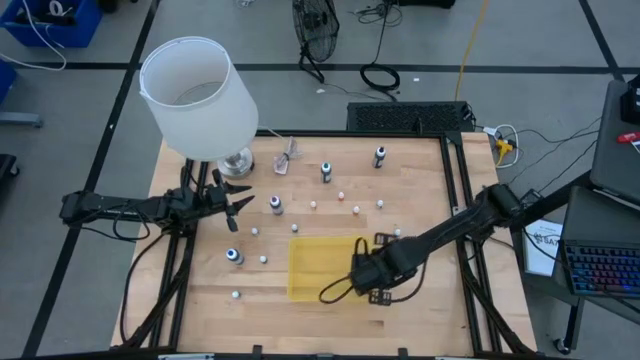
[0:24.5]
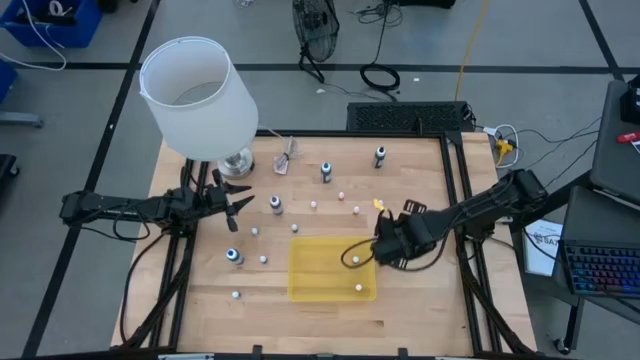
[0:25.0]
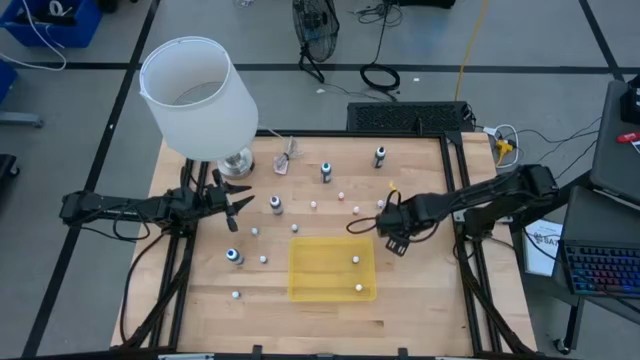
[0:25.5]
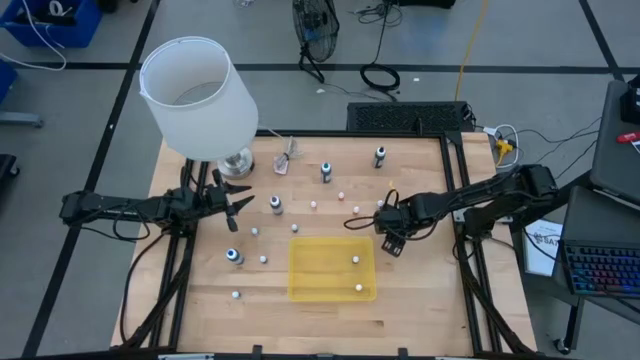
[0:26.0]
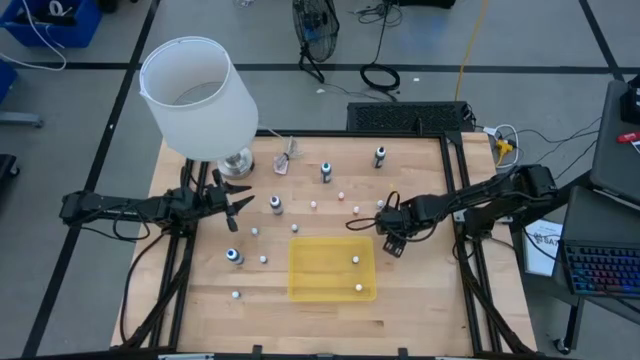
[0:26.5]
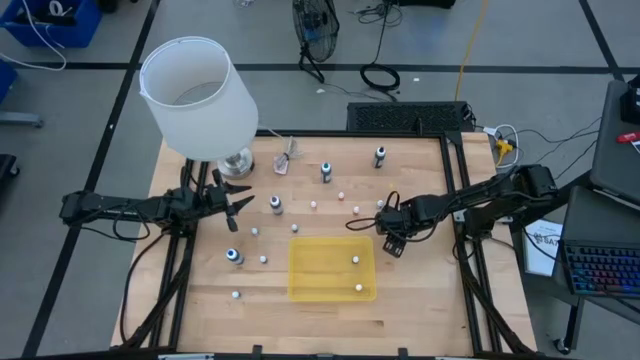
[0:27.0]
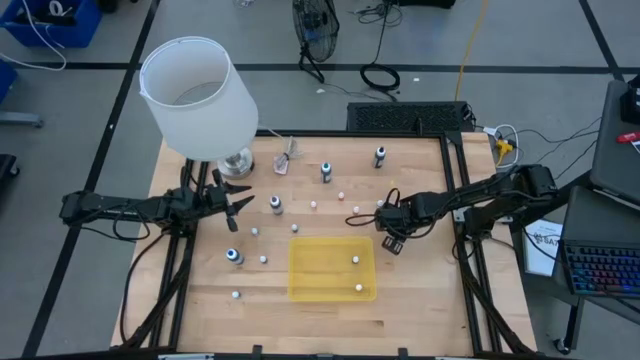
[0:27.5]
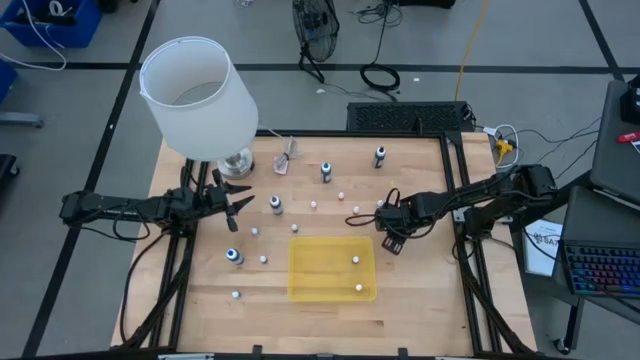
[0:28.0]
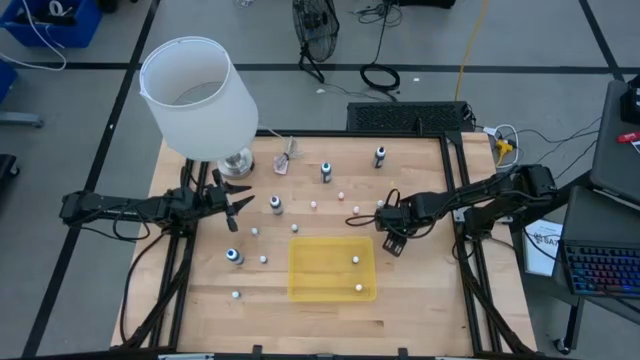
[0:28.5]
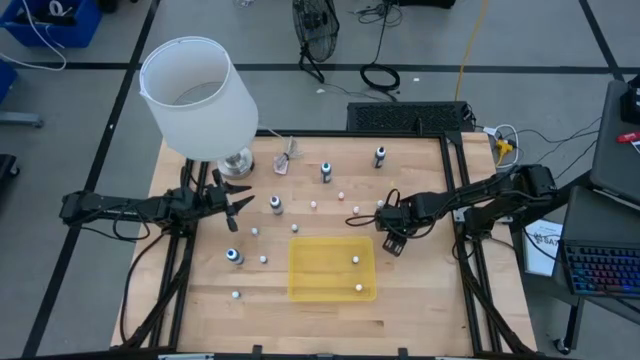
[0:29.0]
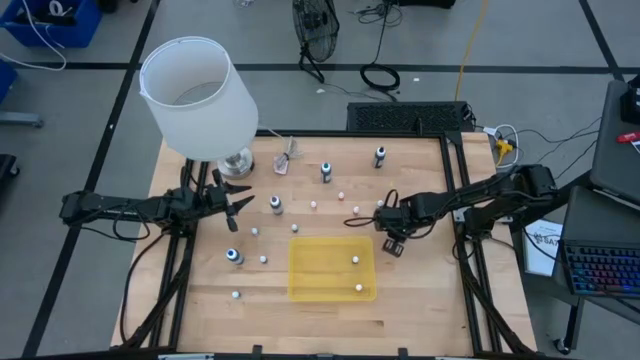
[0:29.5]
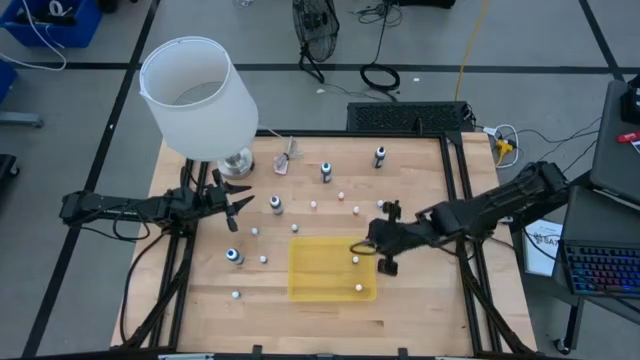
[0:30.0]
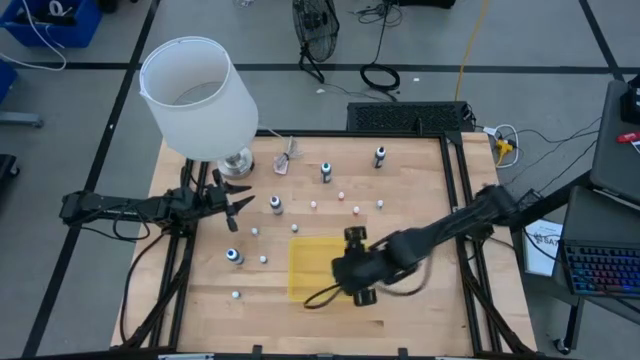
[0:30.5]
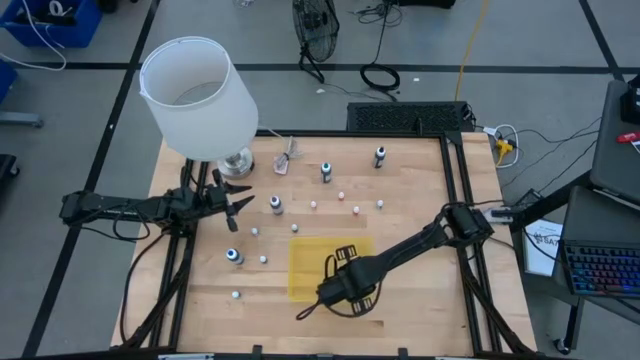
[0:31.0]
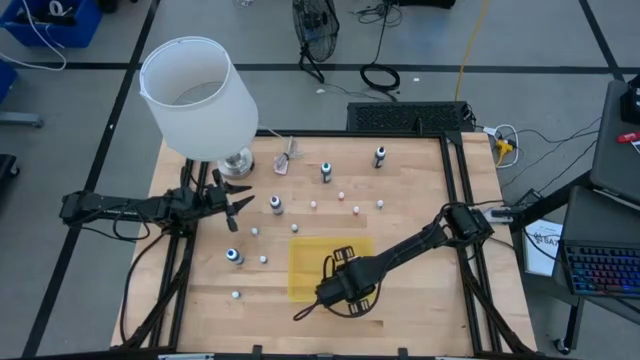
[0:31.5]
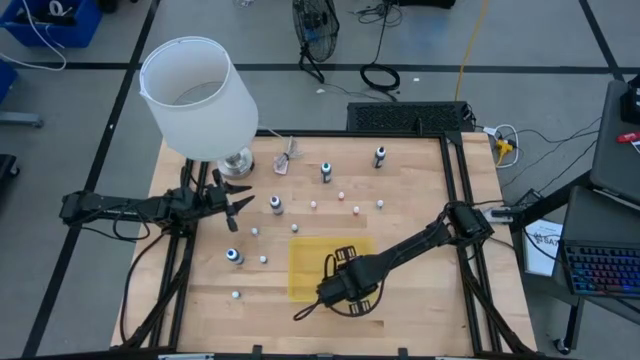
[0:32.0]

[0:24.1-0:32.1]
Task: Pick & Place food coloring
Put the small green food coloring bottle into the yellow container

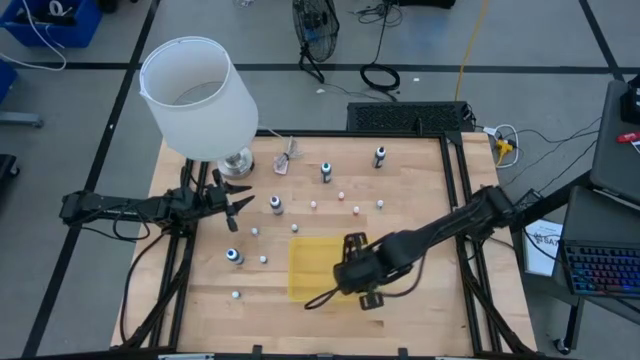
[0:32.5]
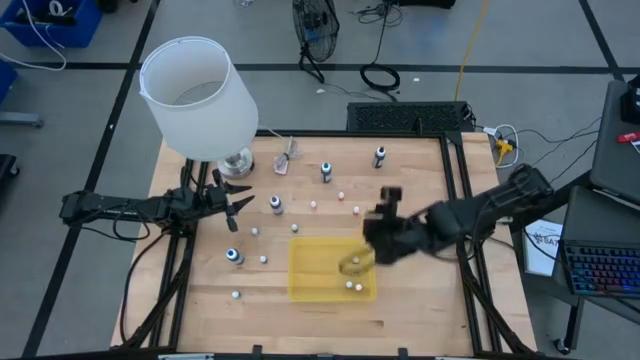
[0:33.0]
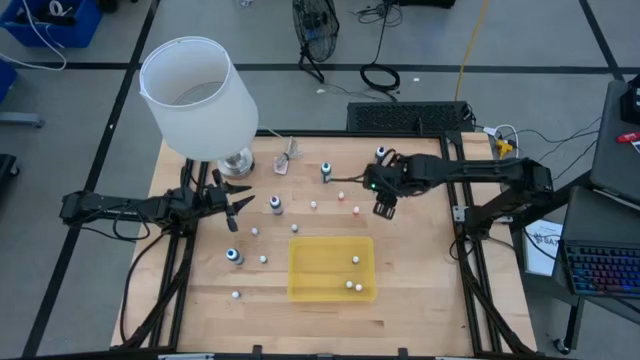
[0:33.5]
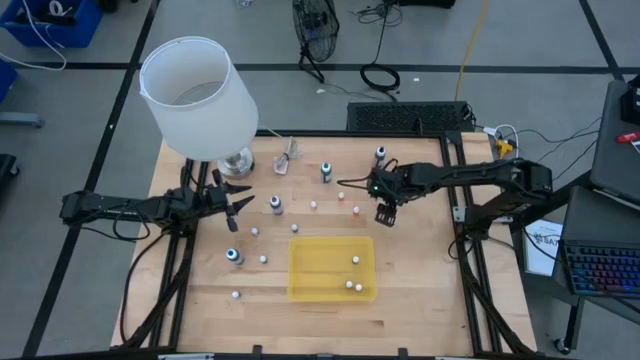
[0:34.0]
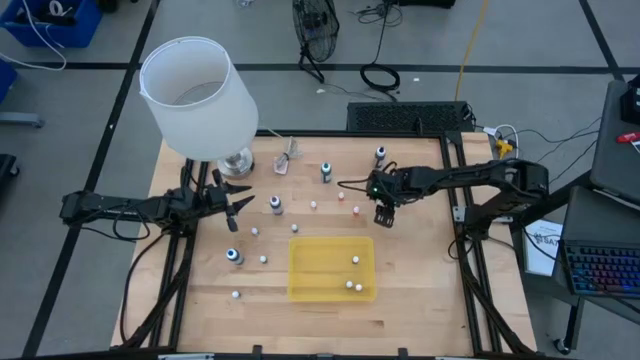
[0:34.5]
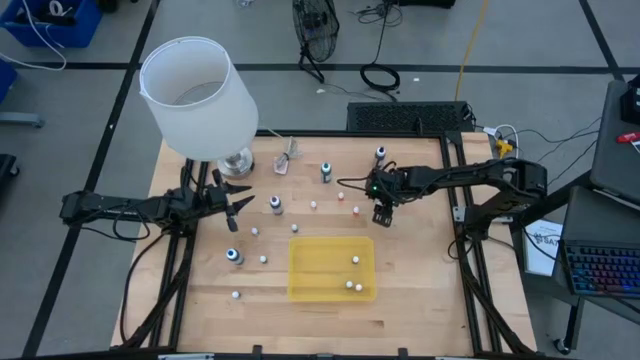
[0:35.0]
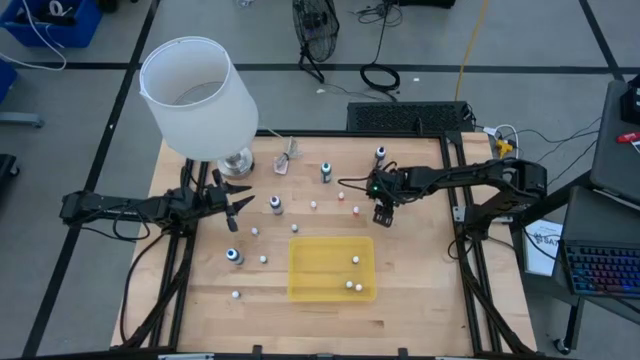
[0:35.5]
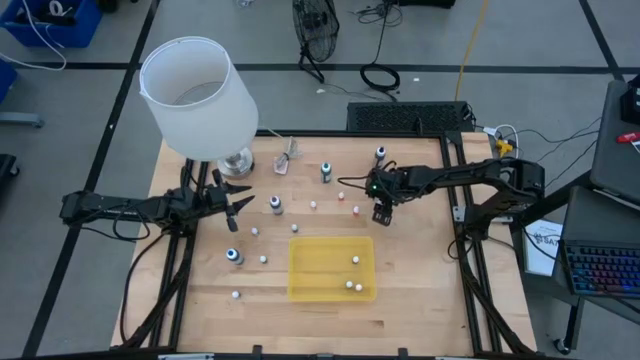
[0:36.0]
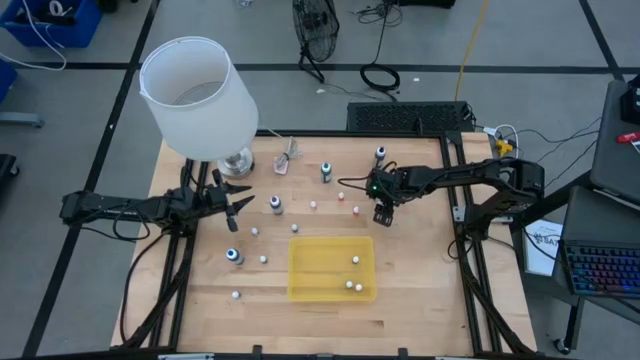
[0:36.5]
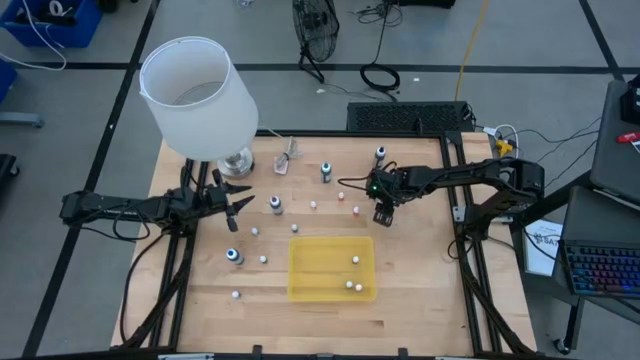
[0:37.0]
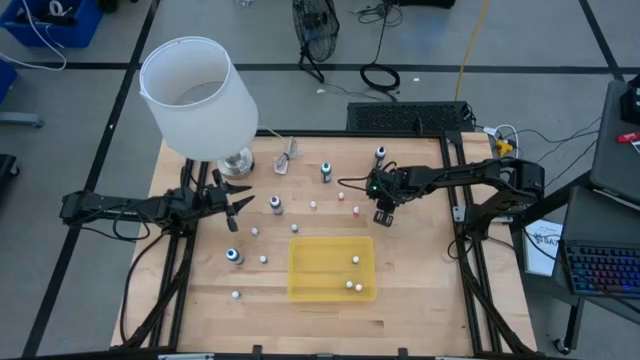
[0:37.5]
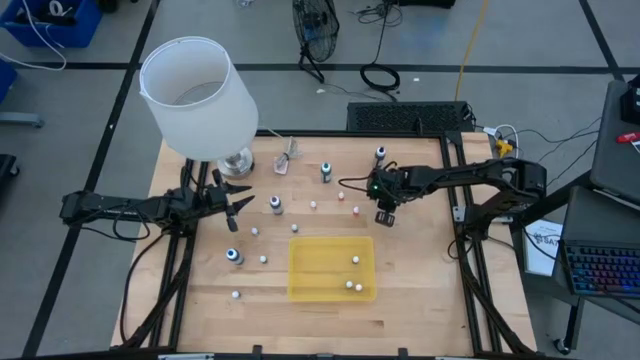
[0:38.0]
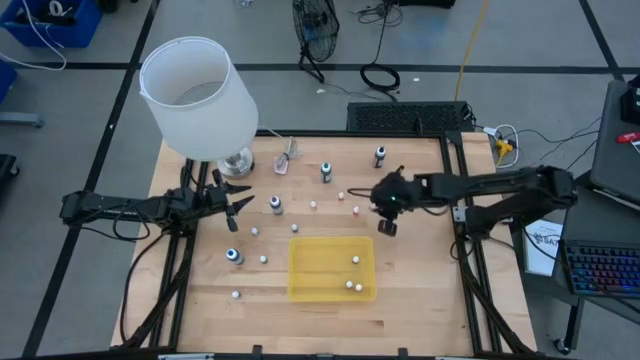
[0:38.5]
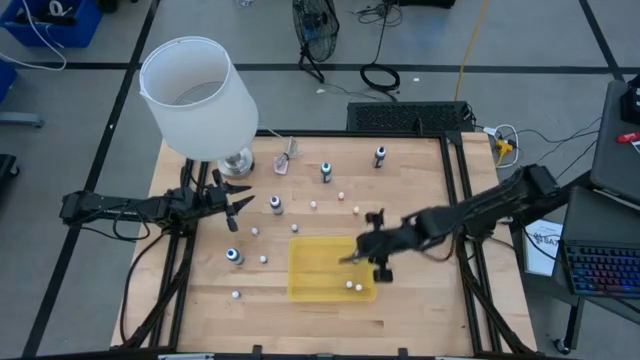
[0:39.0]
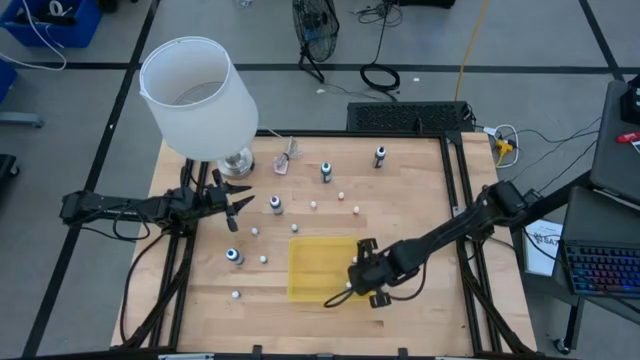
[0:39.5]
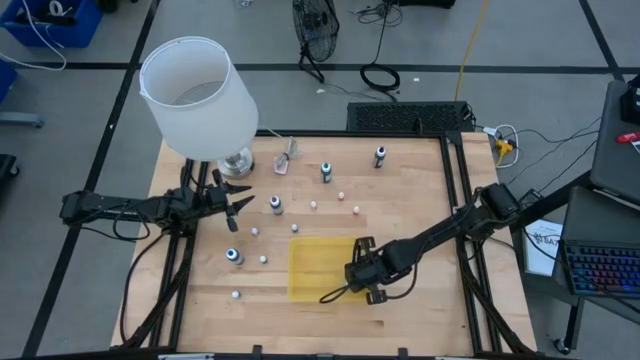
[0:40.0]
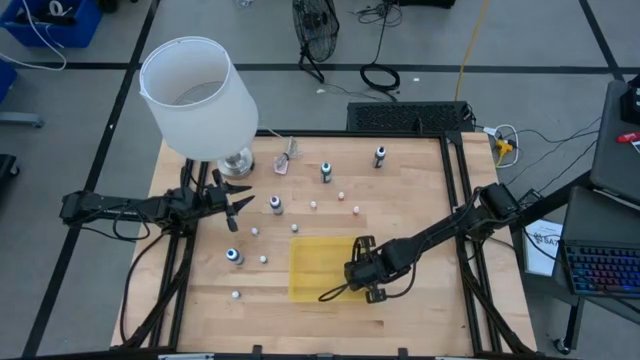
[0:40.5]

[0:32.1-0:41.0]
Put the small red food coloring bottle into the yellow container

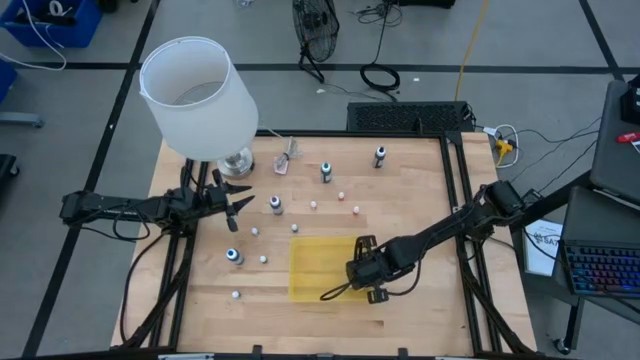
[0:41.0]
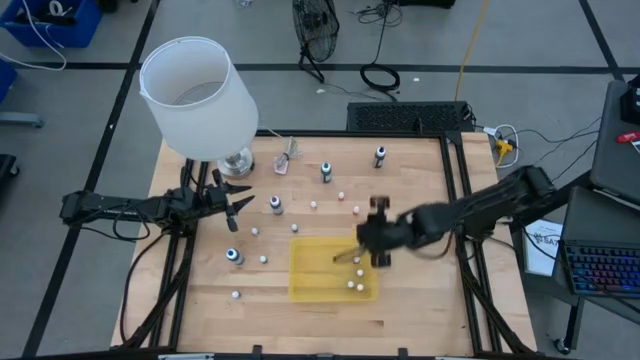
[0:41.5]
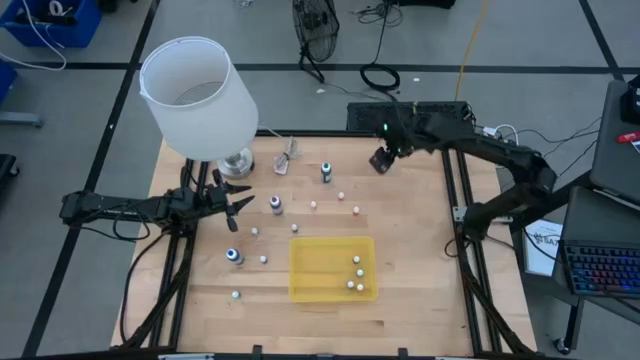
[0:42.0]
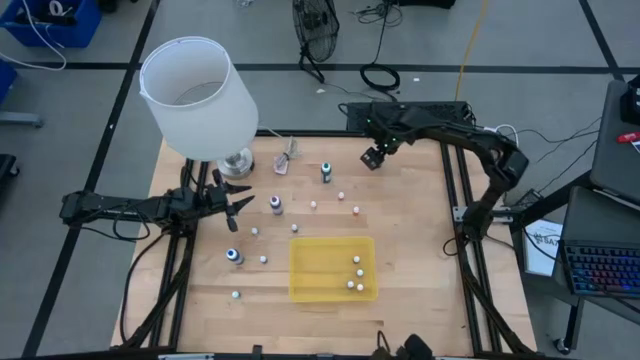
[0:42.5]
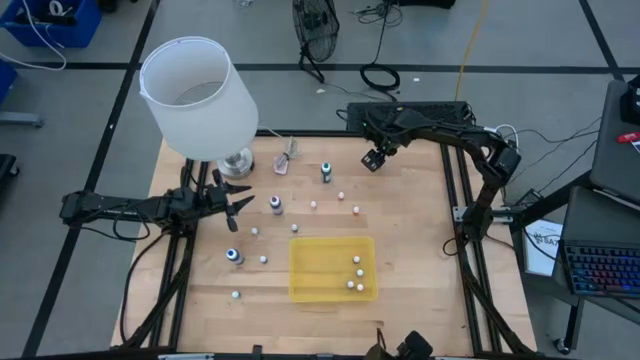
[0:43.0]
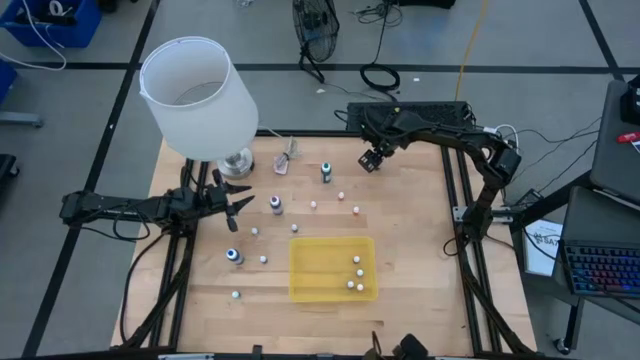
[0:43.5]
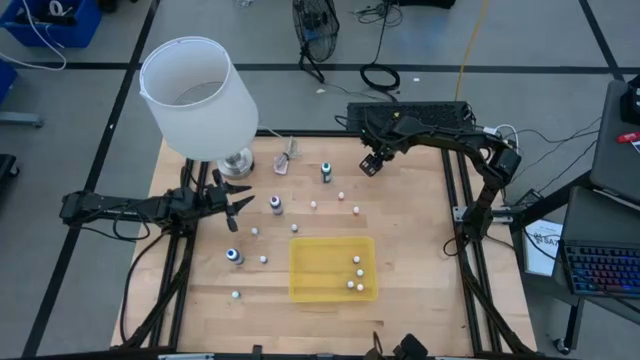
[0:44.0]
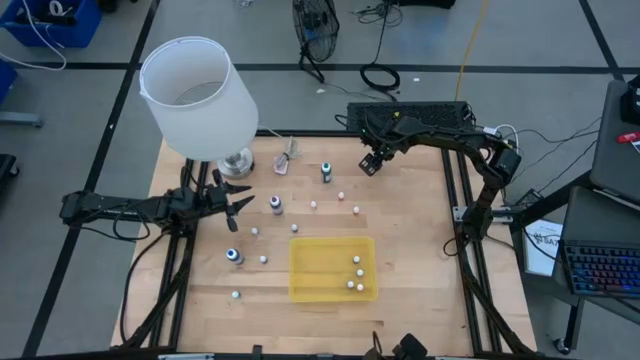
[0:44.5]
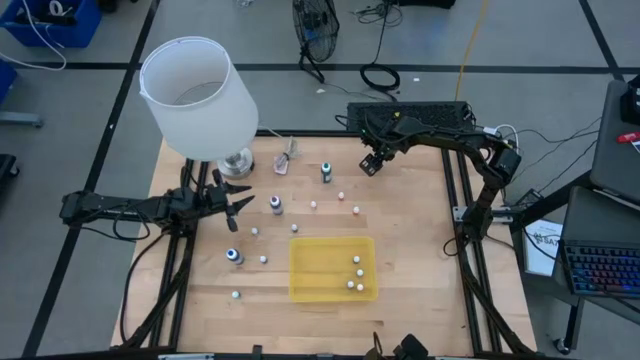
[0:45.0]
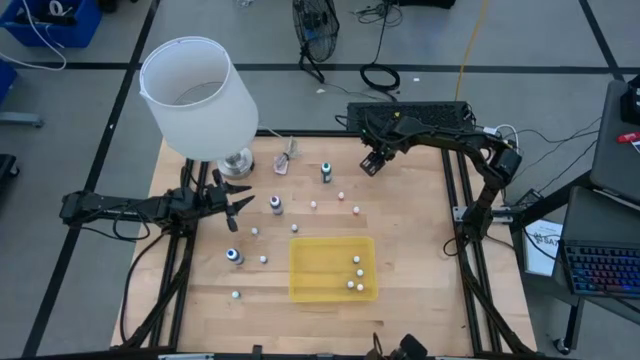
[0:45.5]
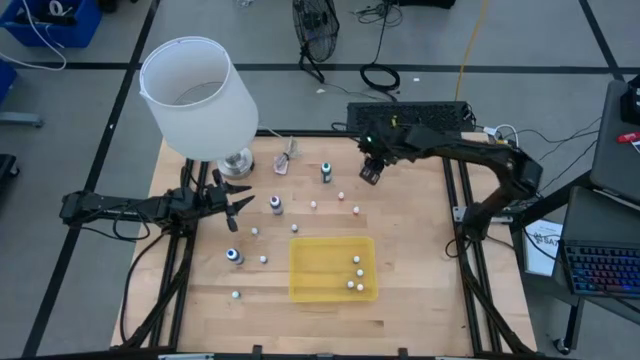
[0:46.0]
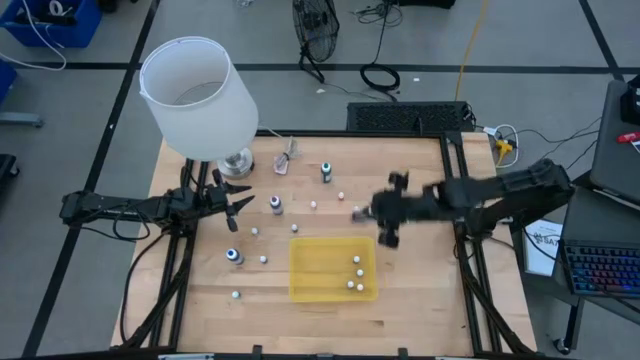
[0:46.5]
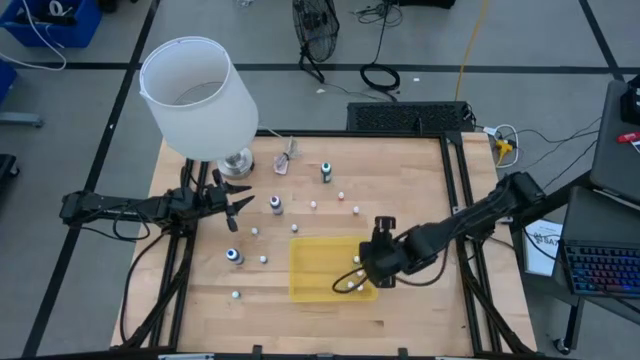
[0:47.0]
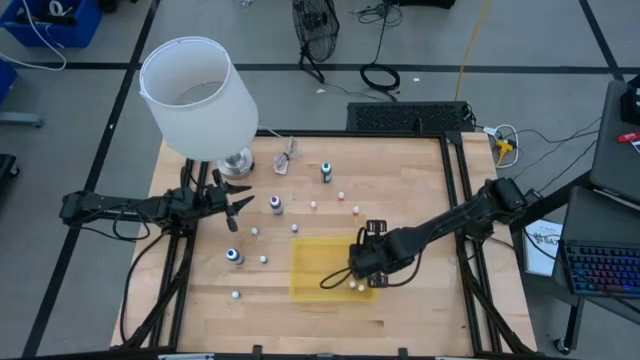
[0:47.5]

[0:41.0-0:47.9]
Put the large black food coloring bottle into the yellow container
